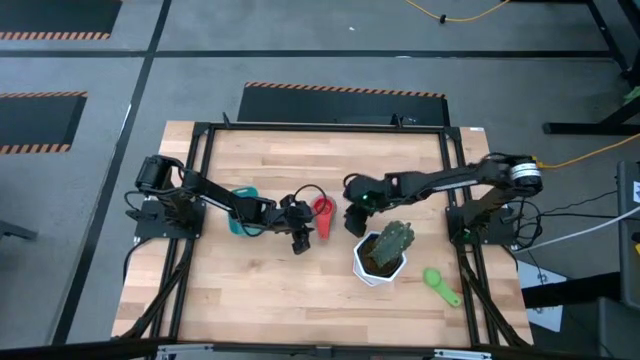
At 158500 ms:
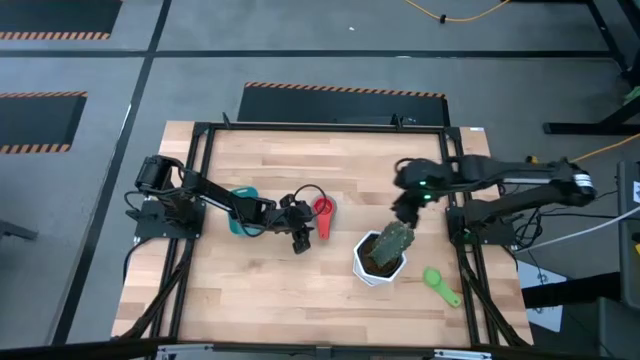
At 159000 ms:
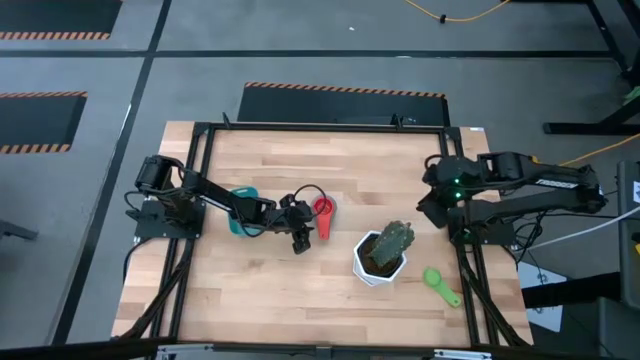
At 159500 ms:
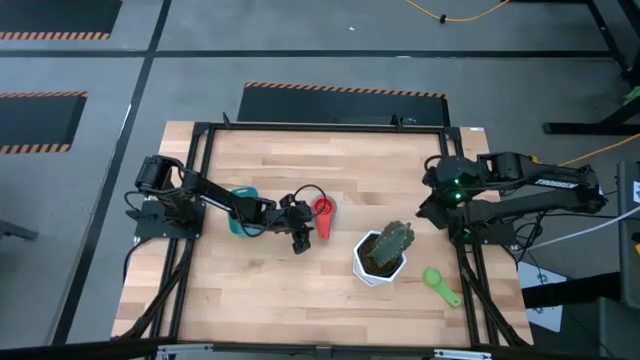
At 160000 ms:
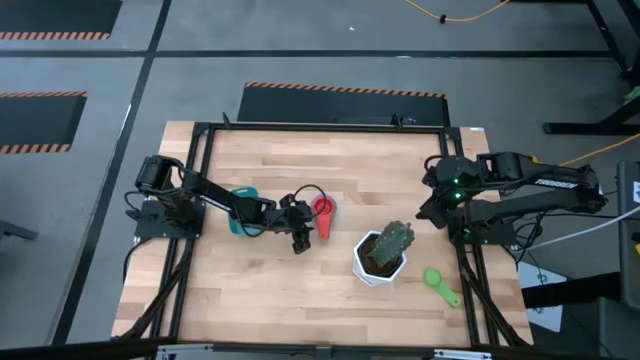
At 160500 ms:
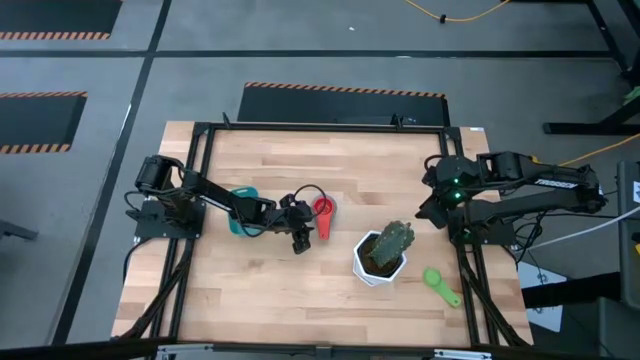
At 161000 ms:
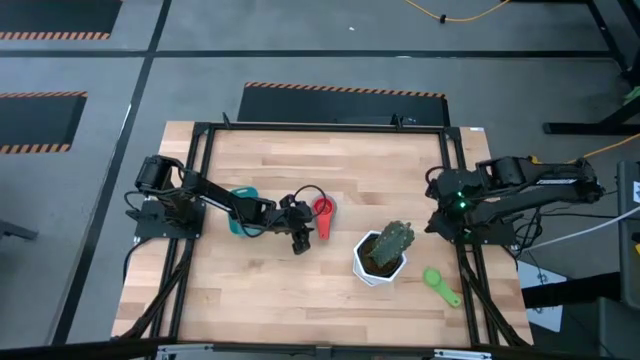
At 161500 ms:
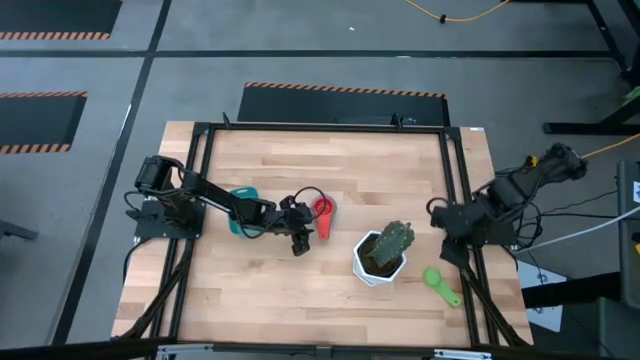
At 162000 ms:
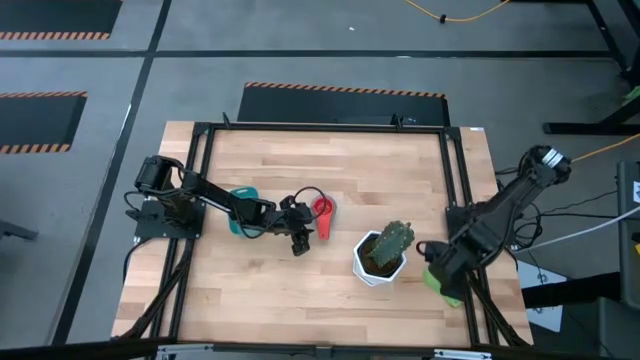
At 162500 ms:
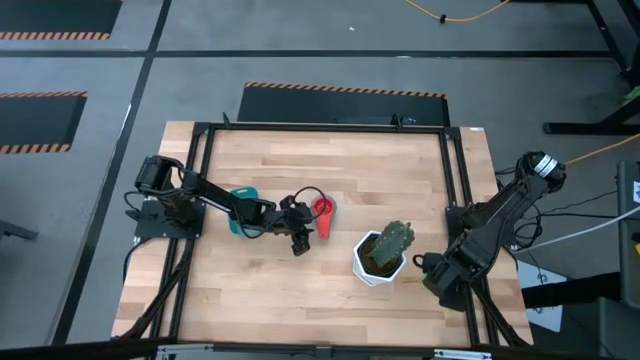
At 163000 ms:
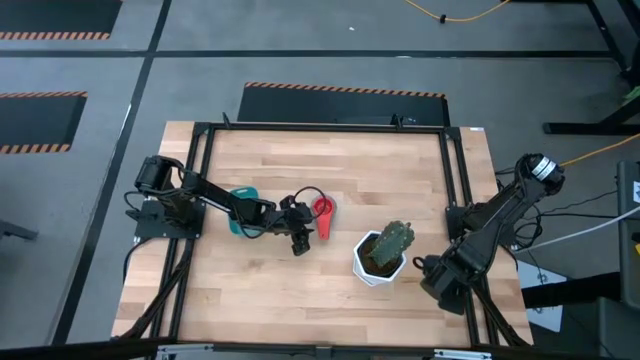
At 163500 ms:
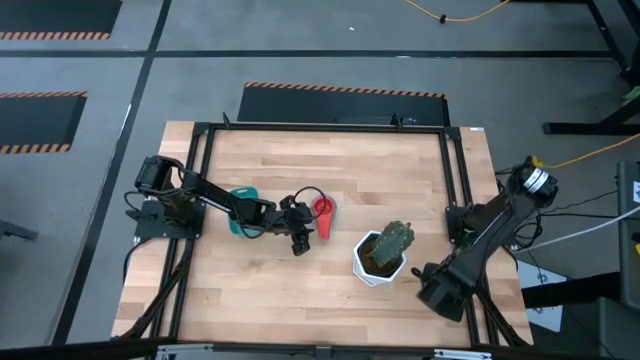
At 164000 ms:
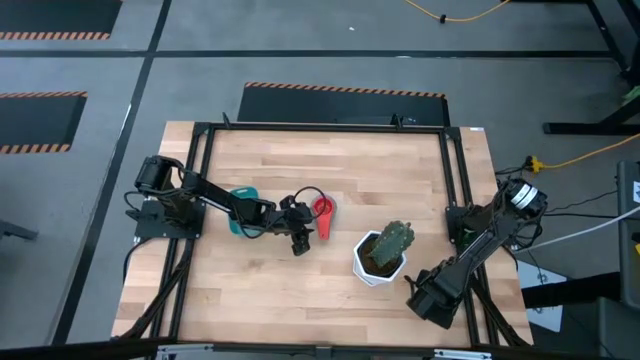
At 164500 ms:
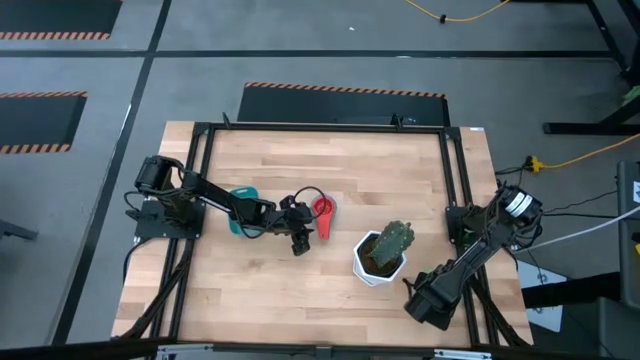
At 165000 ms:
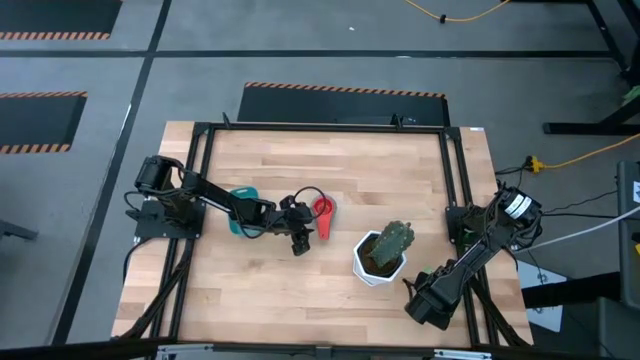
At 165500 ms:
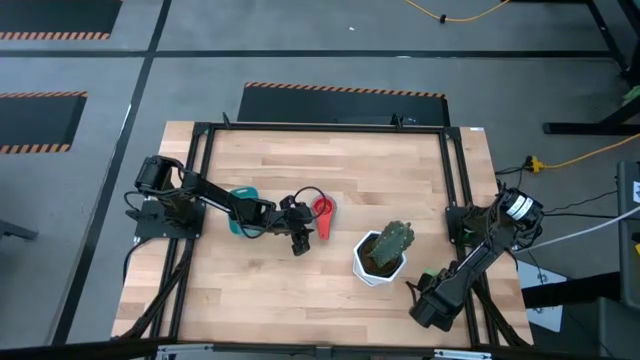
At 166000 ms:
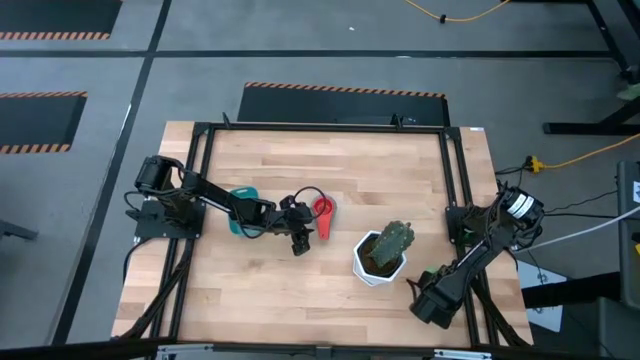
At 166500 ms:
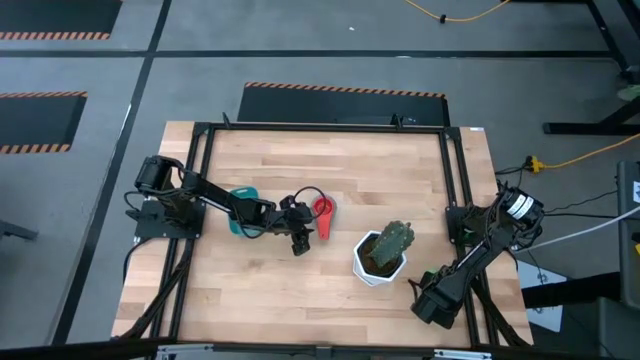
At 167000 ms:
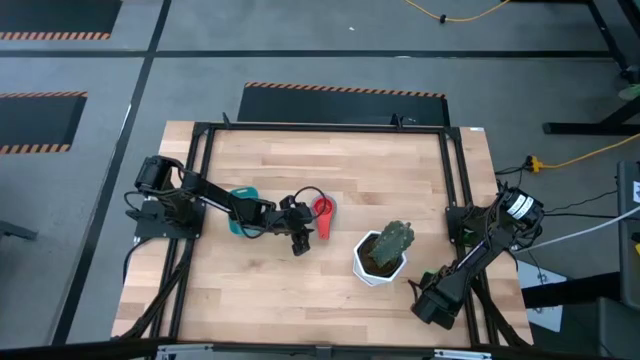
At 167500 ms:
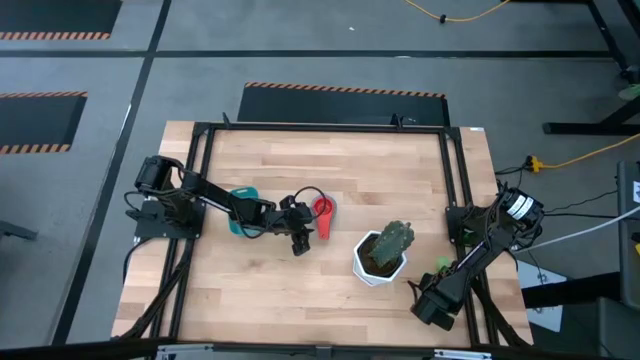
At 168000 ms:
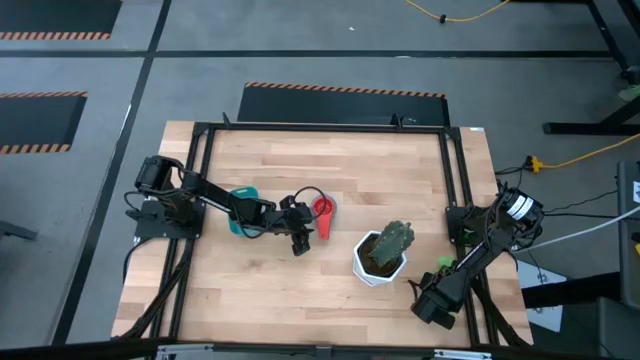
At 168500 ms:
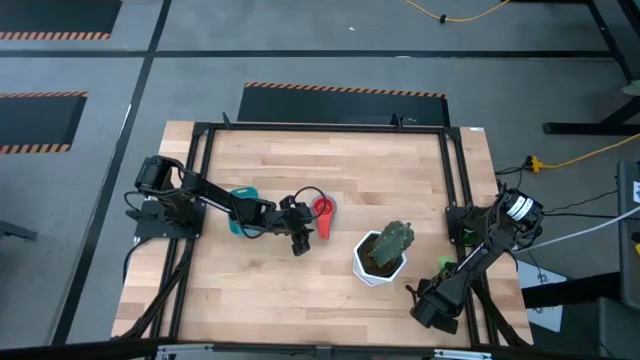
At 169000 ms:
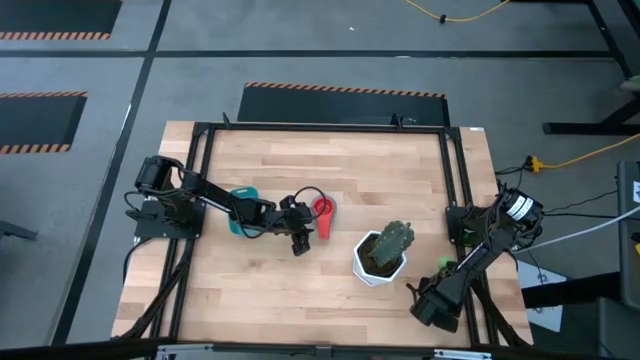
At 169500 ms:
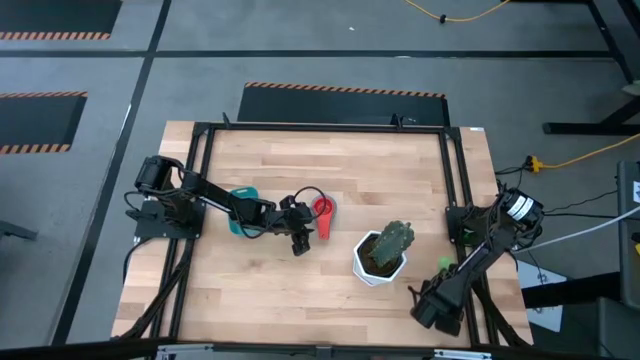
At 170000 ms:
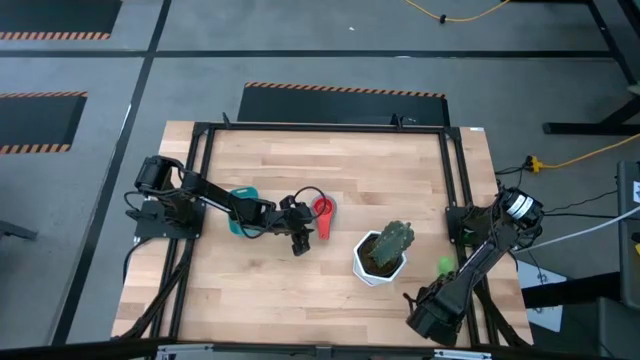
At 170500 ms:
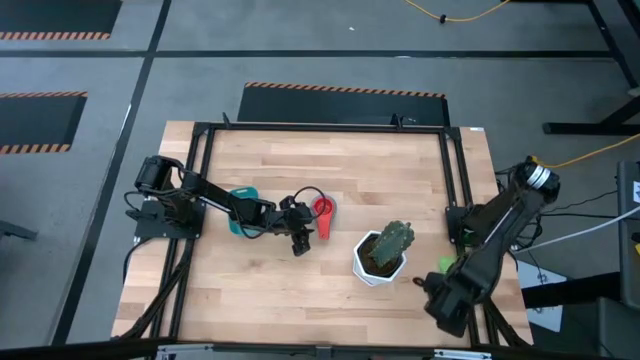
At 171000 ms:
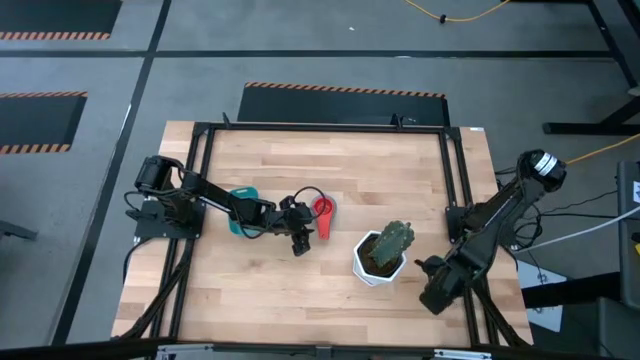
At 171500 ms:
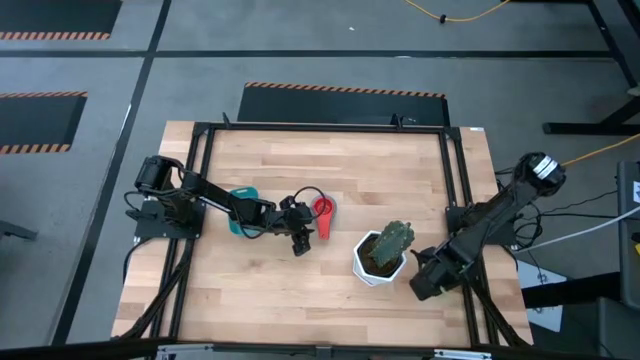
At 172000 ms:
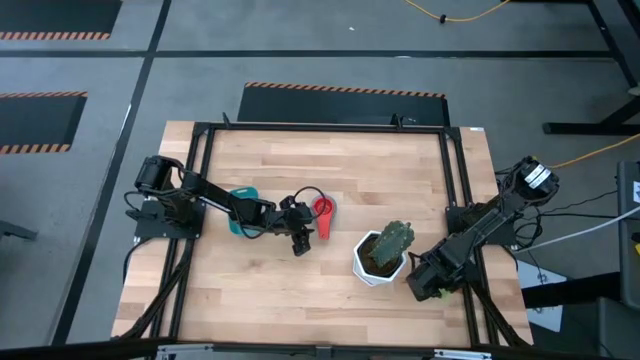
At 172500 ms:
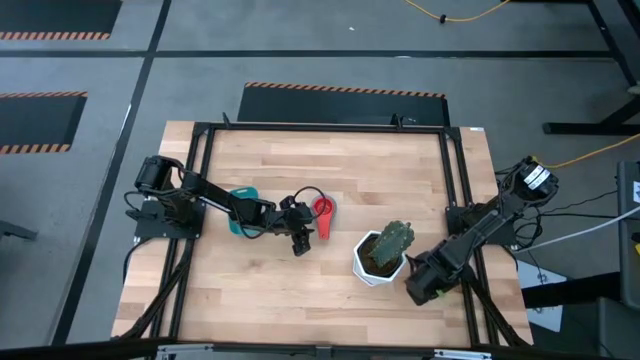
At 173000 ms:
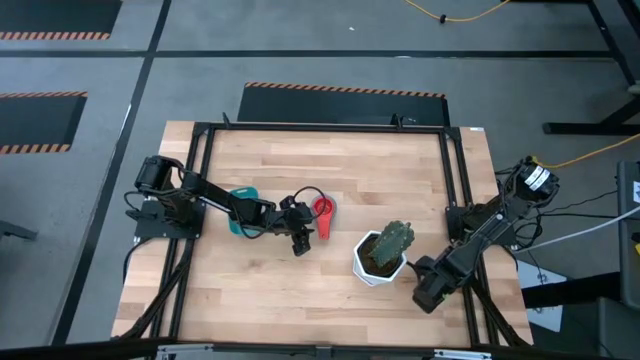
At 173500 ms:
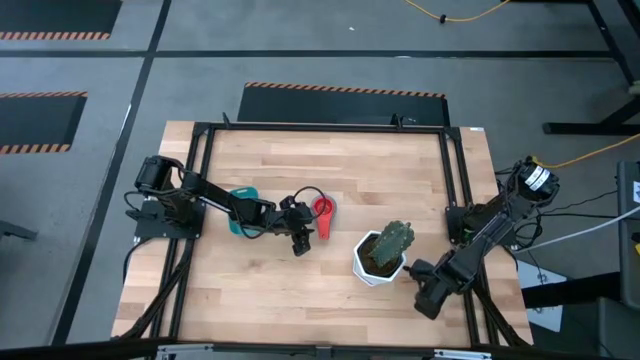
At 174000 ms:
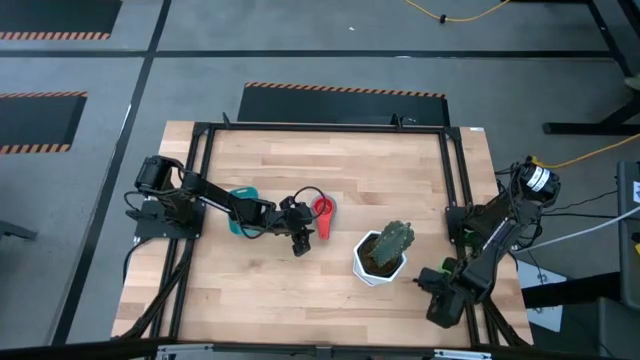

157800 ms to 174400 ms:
Task: Nest measuring cups in basket
Stack the green measuring cup on top of the red measuring cup

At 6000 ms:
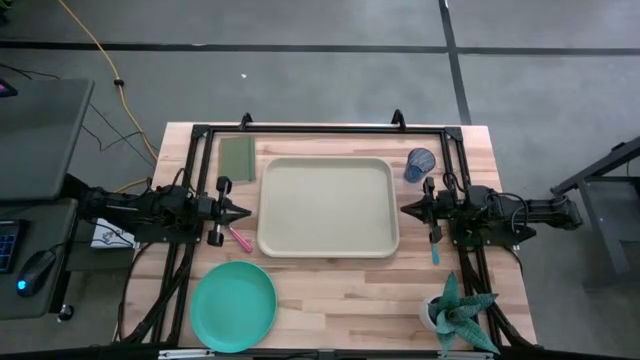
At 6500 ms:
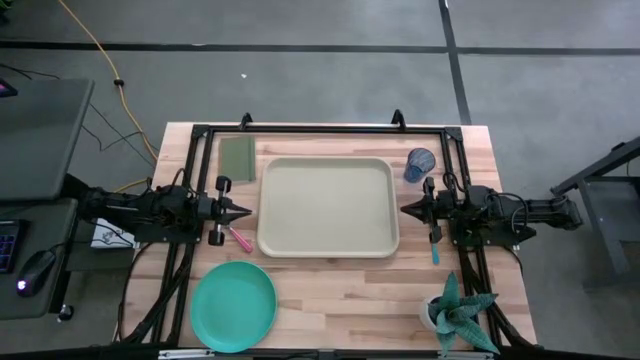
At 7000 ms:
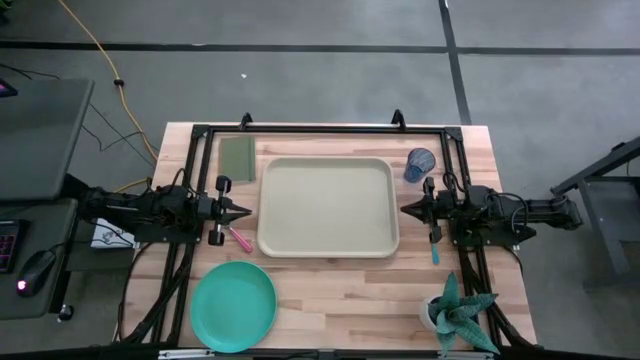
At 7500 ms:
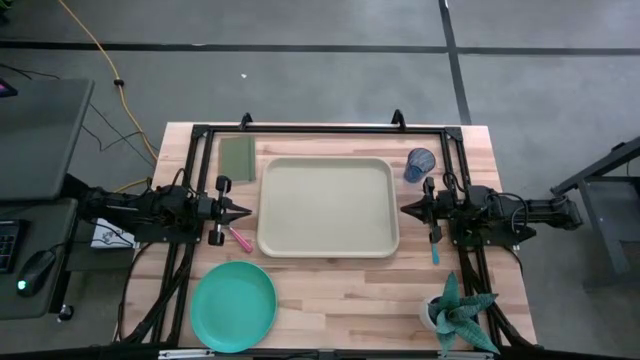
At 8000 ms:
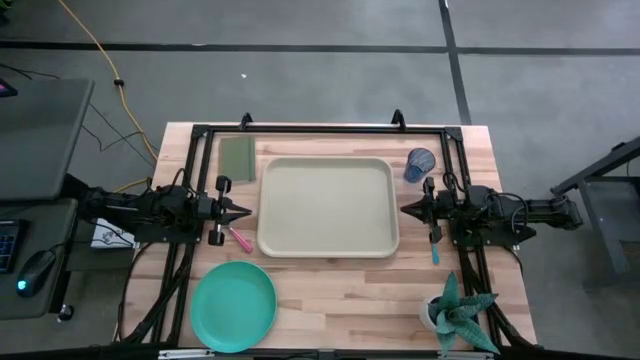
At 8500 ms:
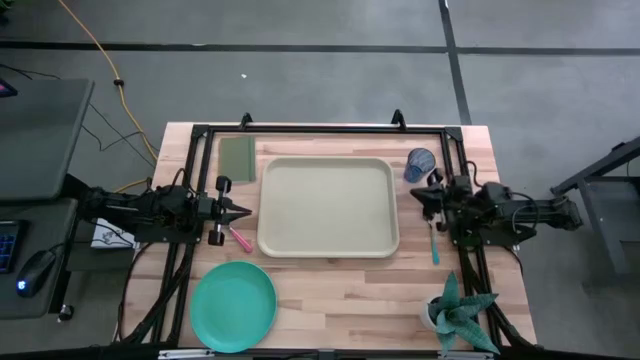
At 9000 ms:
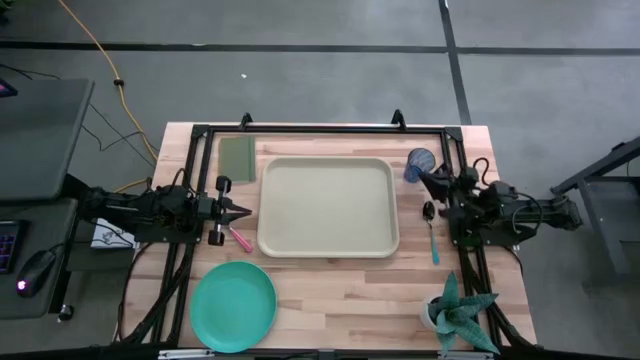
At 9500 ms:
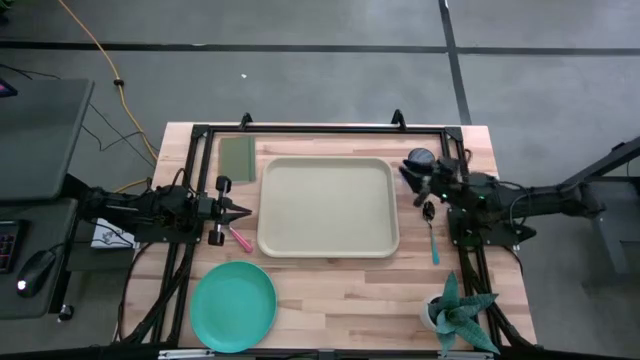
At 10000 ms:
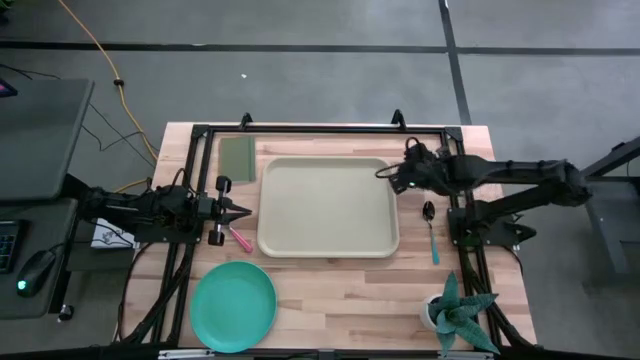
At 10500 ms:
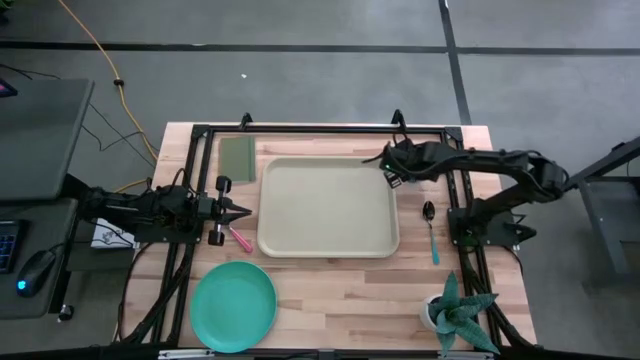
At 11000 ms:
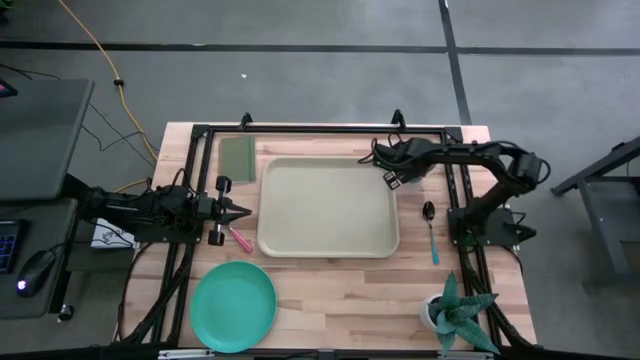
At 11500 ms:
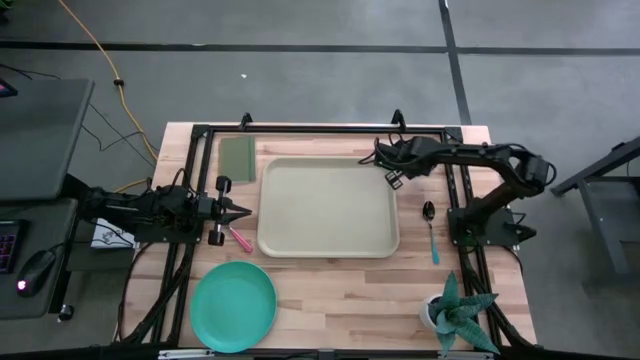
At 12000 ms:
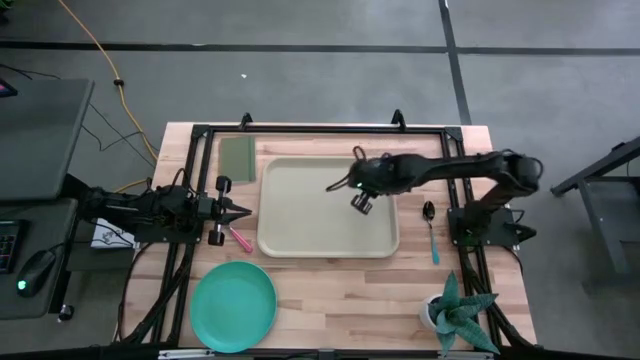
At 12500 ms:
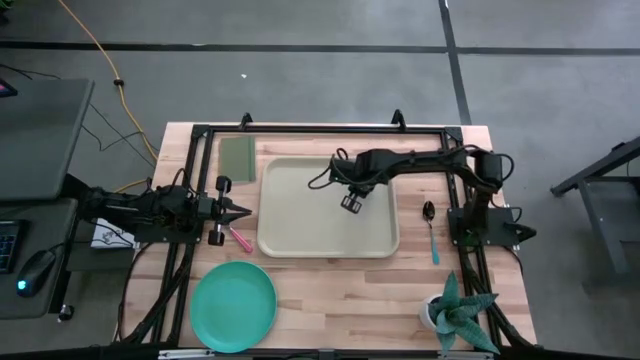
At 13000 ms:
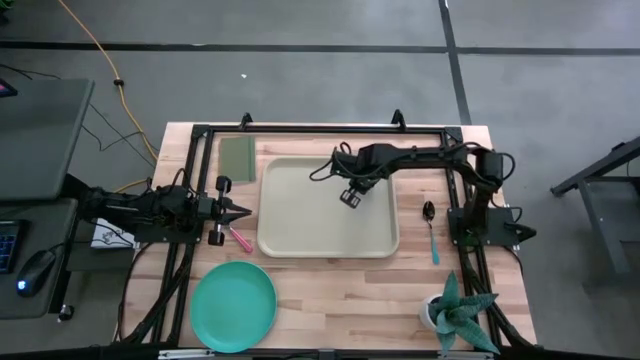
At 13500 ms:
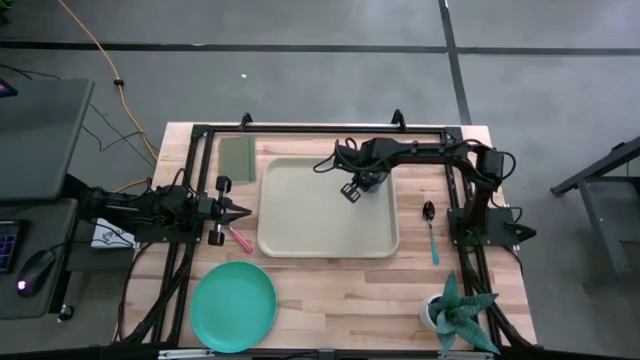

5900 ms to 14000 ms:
Task: Pick and place plate/cup/fork/spoon on tray
Put the blue glass on the top right of the light brown serving tray
